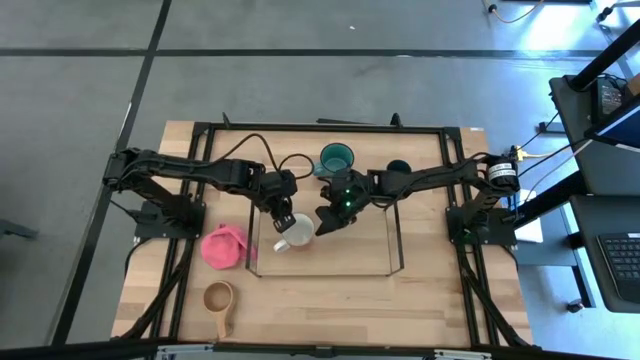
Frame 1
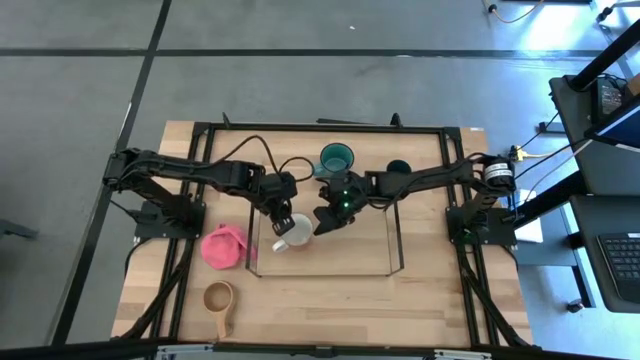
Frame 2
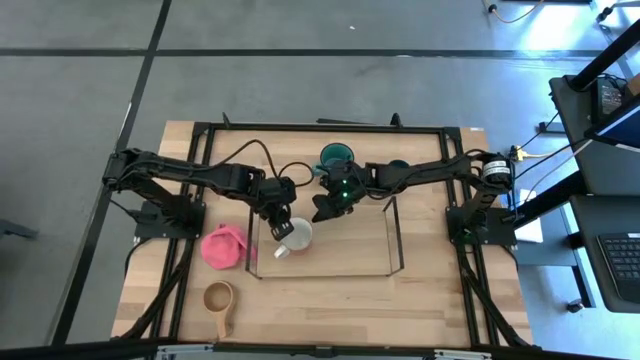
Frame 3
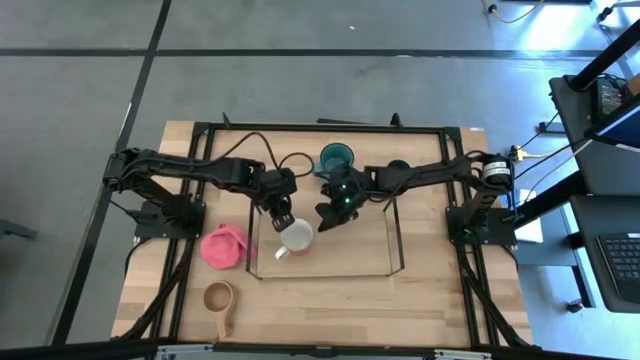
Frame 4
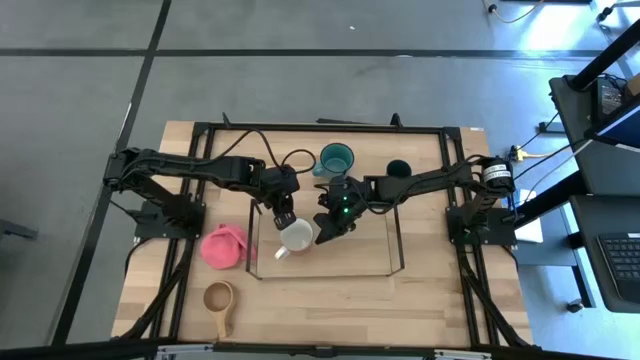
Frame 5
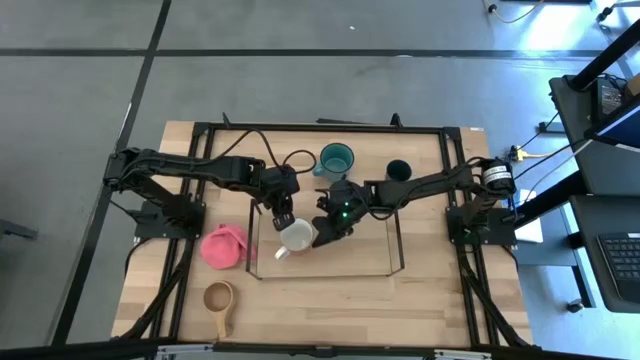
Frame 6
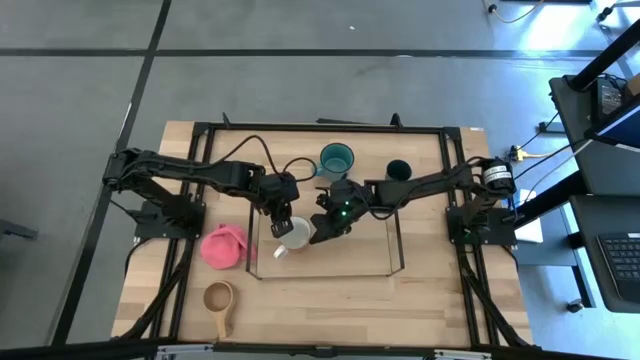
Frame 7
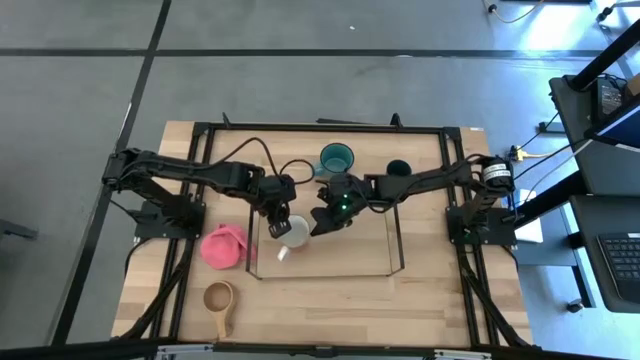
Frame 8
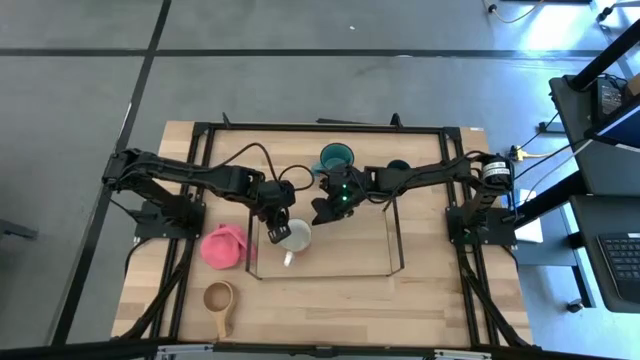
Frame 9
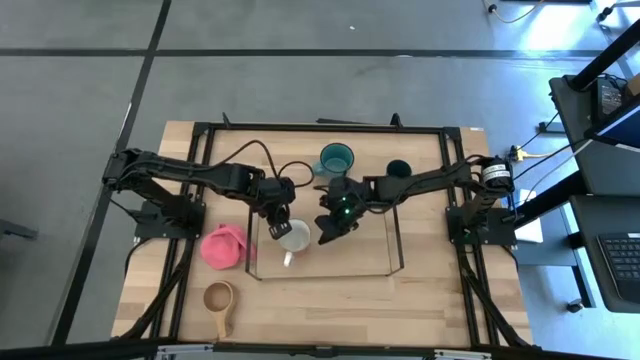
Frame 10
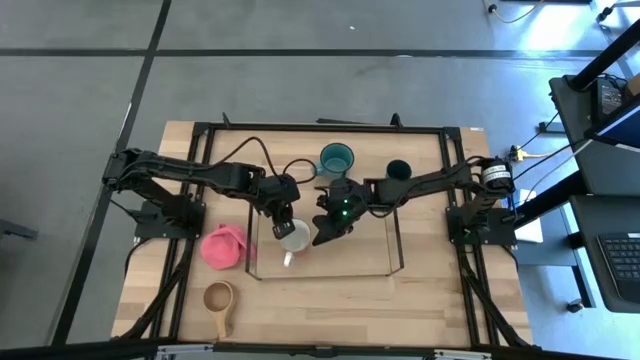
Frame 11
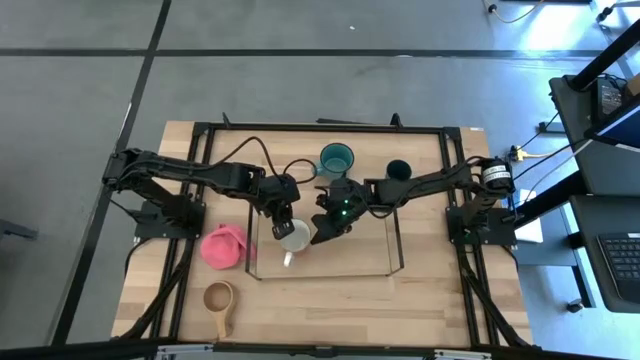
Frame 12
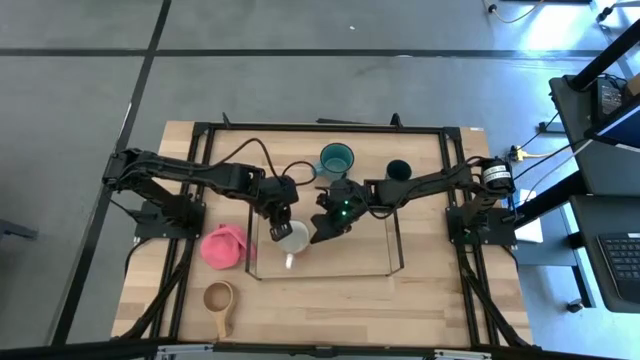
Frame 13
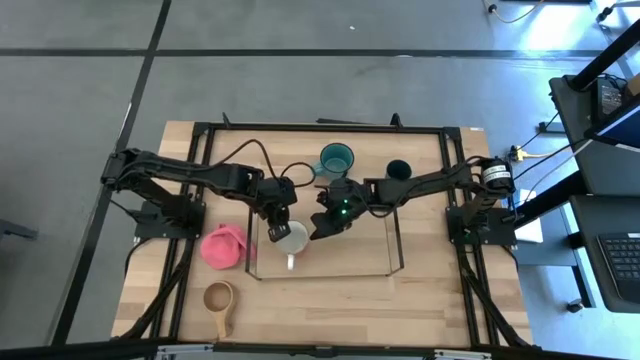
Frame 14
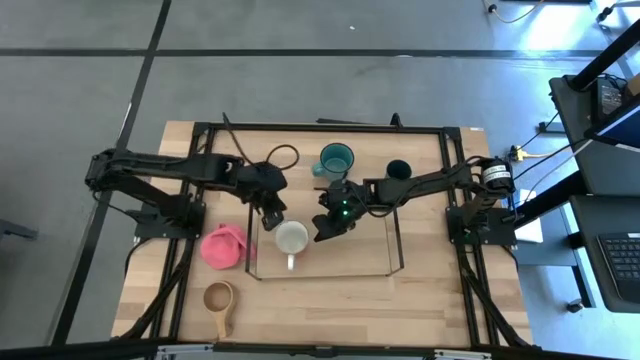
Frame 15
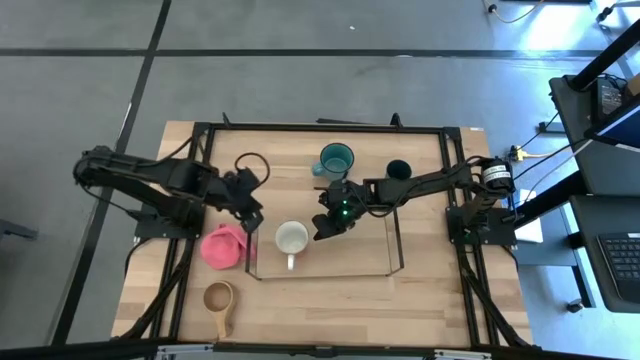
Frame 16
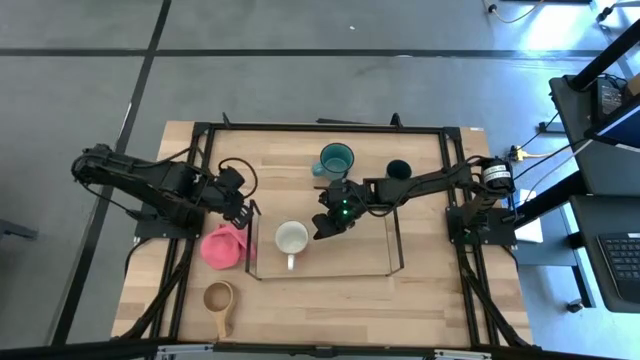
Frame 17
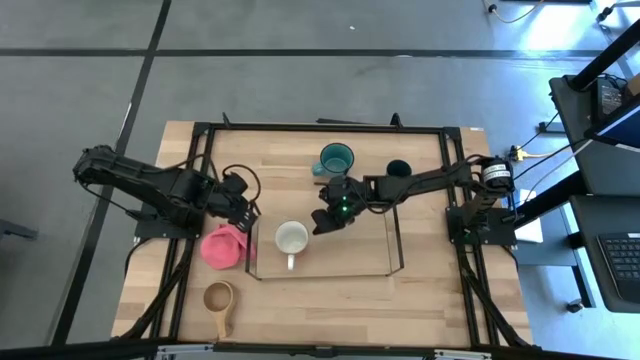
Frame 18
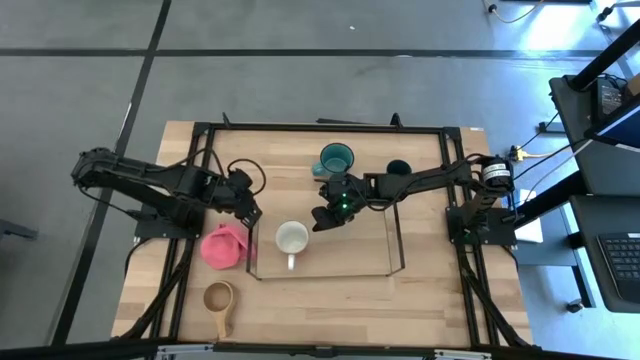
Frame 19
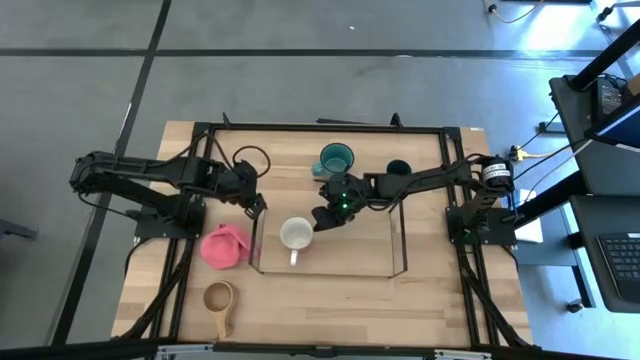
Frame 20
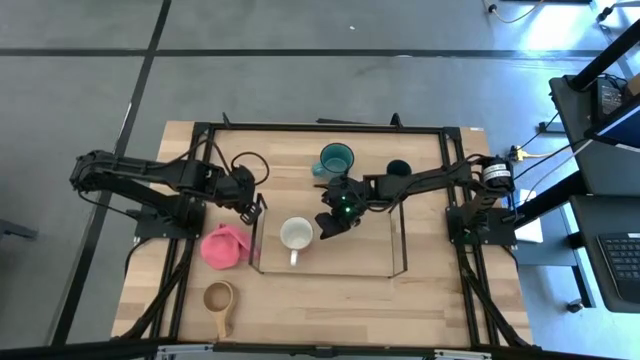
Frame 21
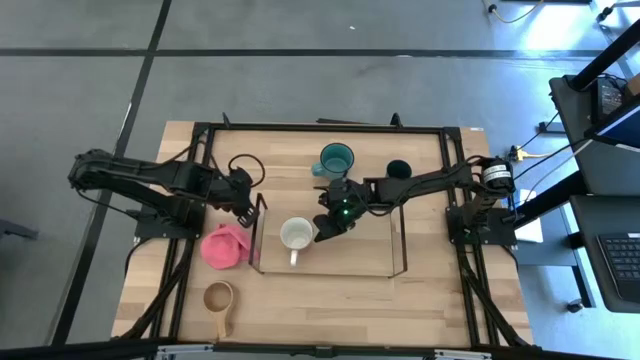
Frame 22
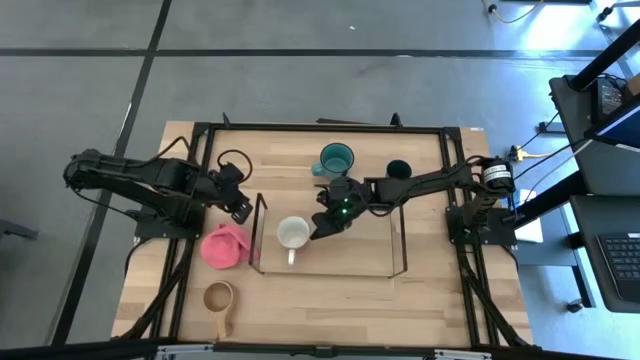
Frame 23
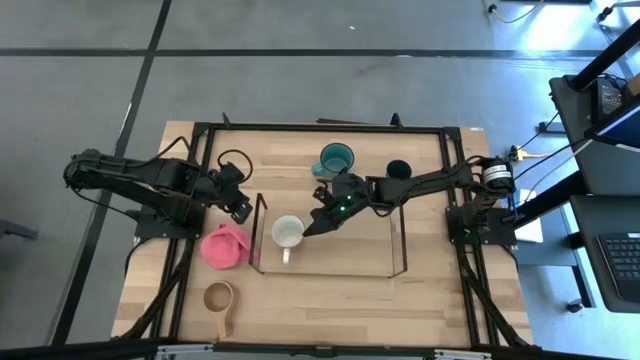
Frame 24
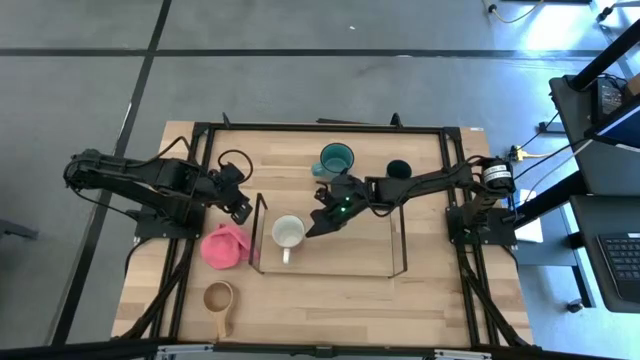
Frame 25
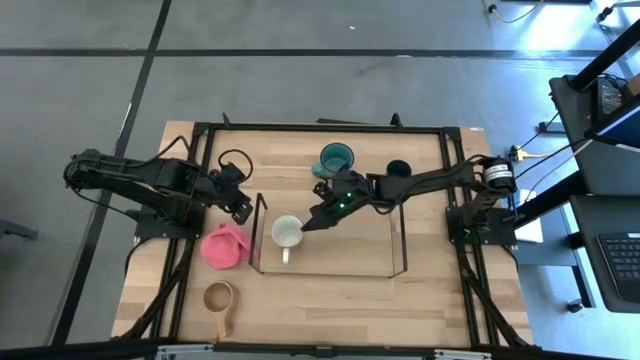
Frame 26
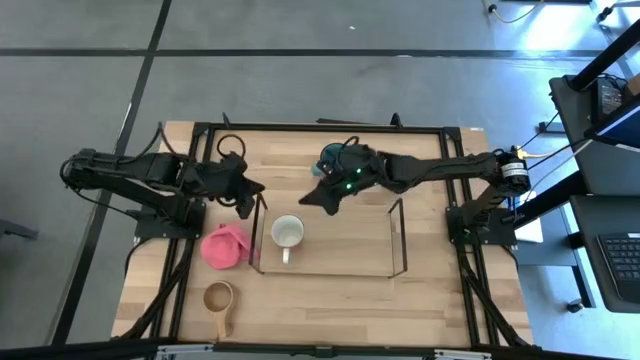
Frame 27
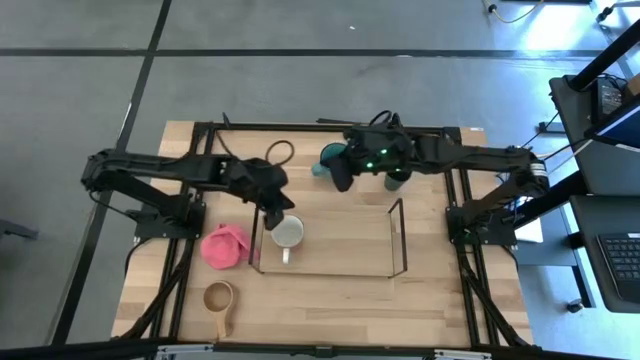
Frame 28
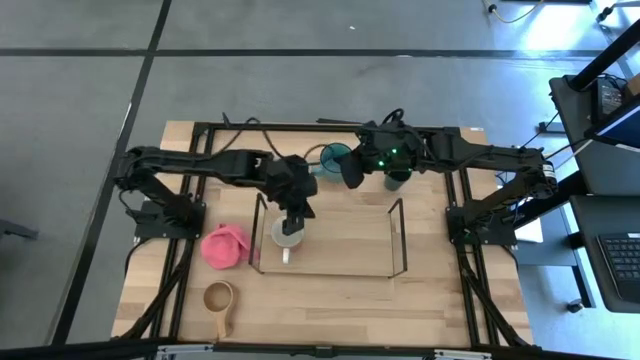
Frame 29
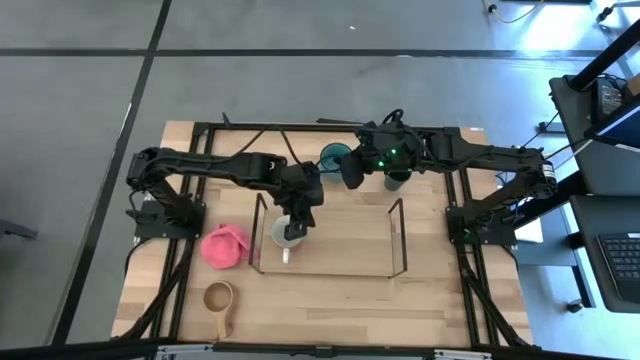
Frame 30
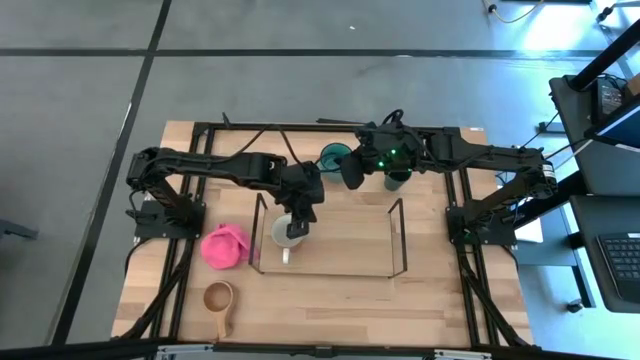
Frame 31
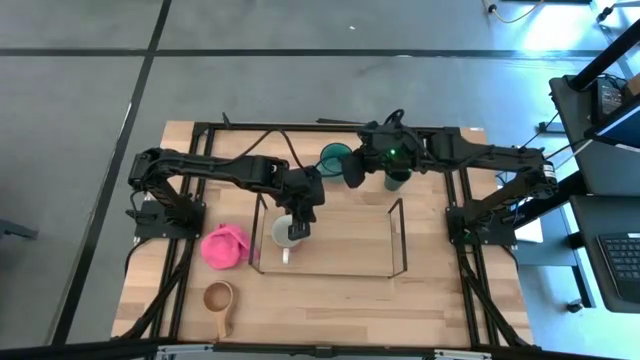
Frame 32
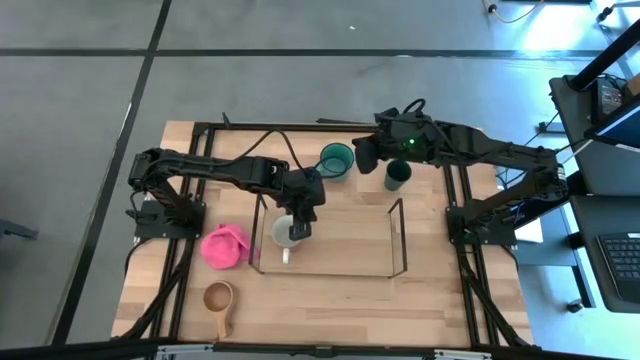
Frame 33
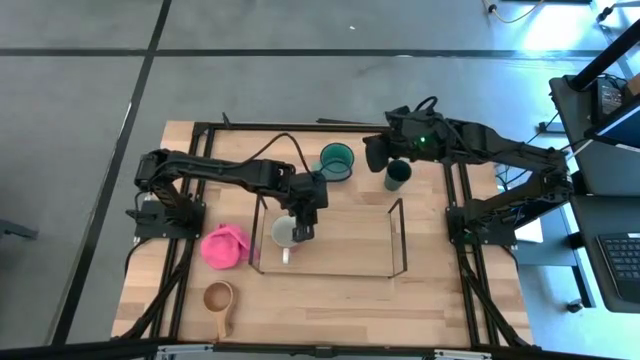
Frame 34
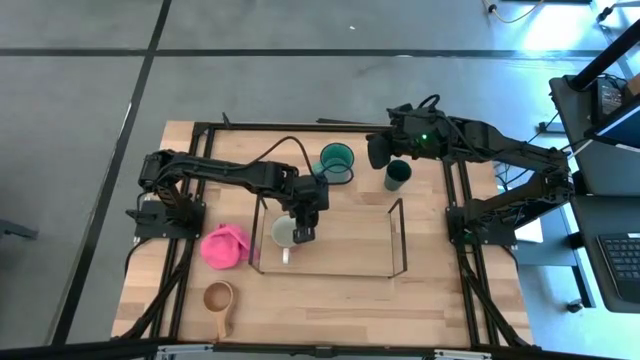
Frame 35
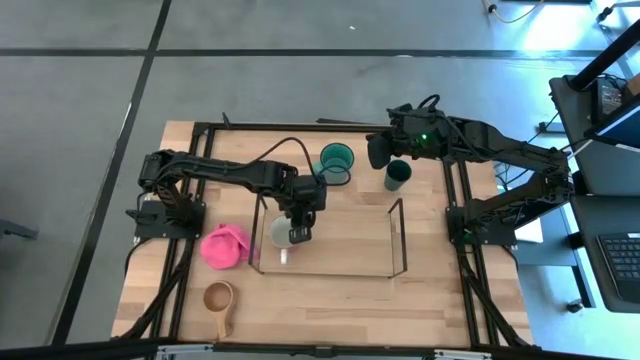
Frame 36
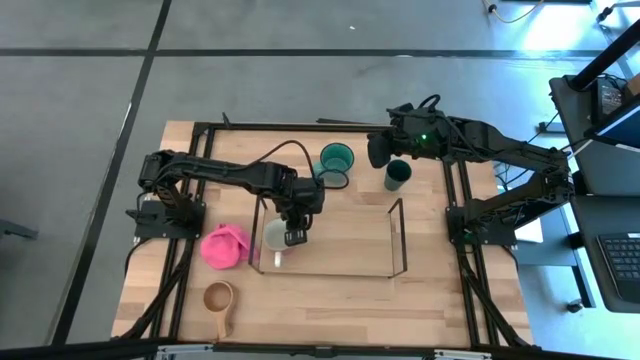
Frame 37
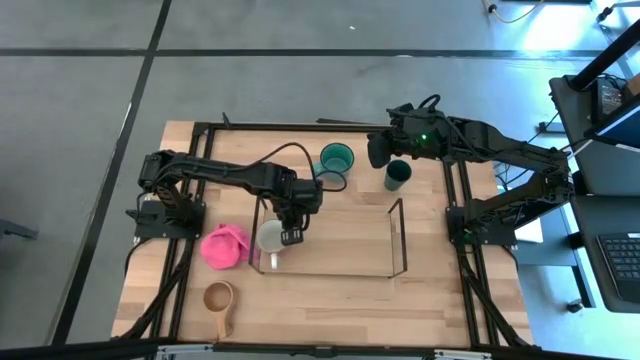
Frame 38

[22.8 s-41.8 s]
Task: Stack small to large cups/mugs on shelf
Put the orange mug on the shelf

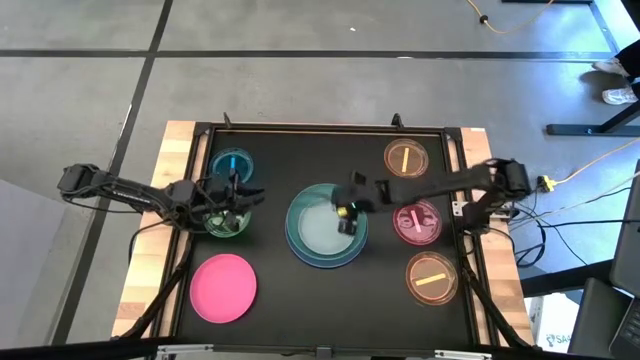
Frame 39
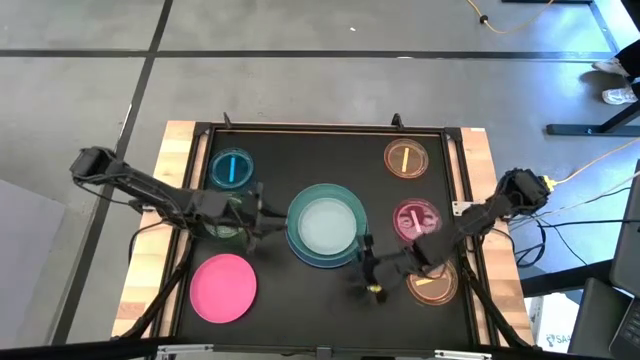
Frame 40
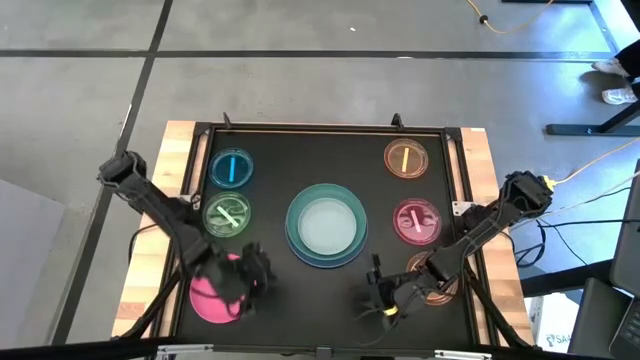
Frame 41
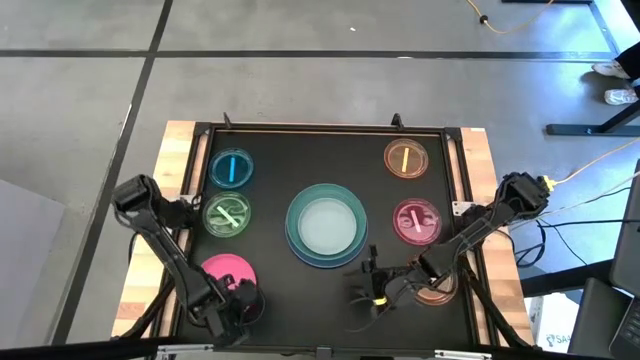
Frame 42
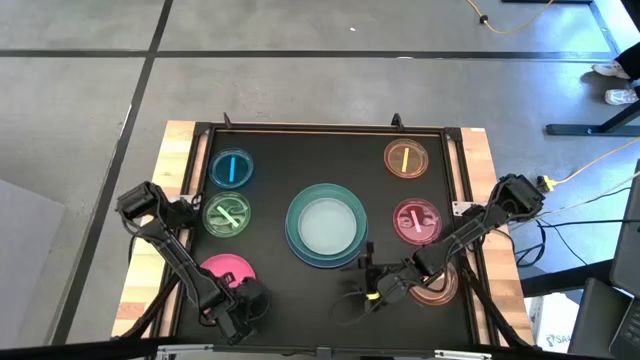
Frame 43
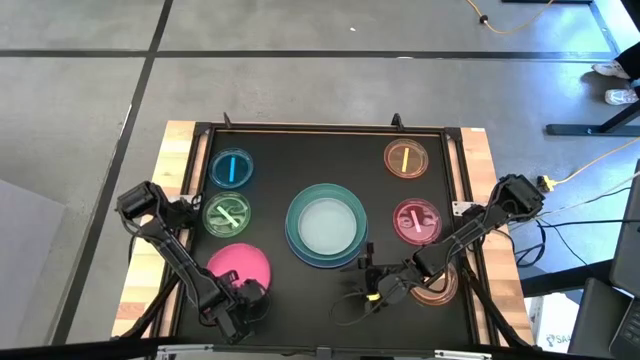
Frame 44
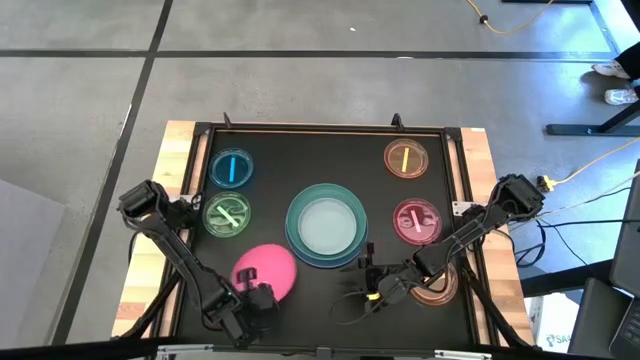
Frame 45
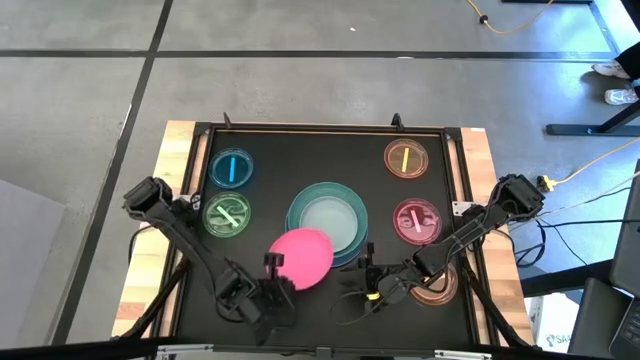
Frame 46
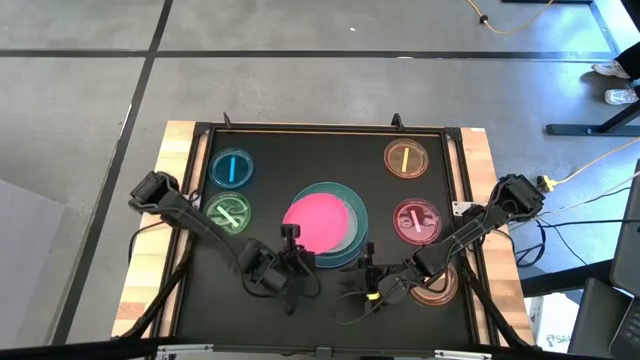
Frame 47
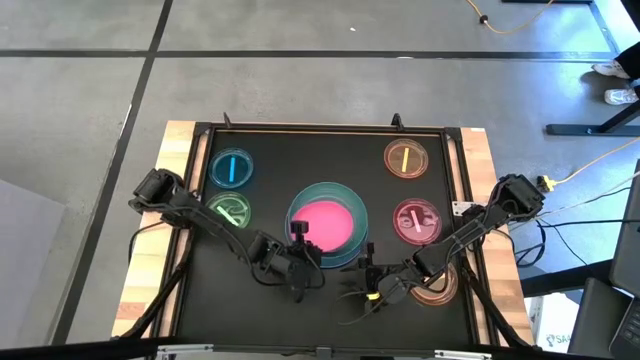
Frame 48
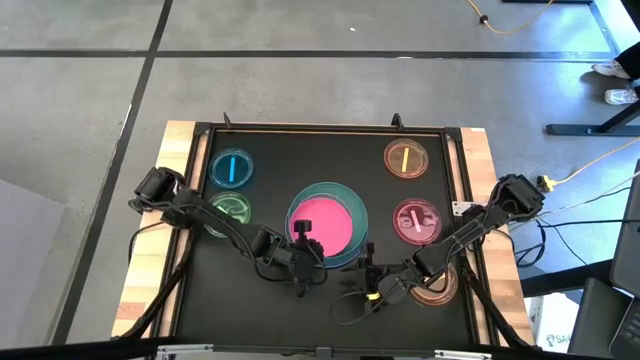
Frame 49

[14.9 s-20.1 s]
Task: Stack plastic plates
Stack the pink plate on the gray plate
